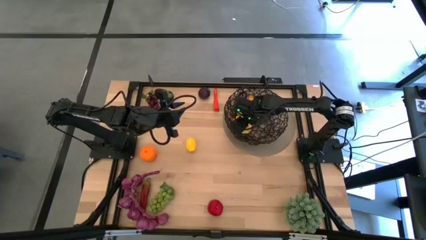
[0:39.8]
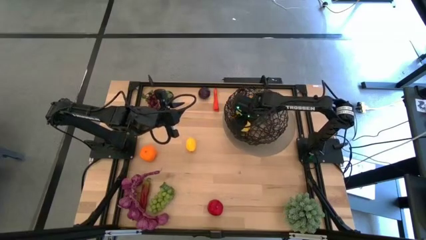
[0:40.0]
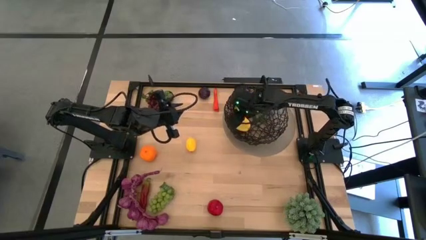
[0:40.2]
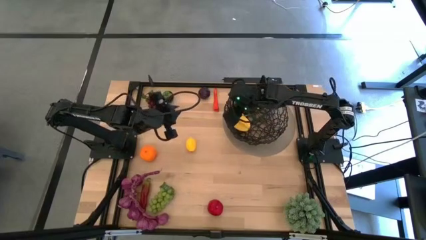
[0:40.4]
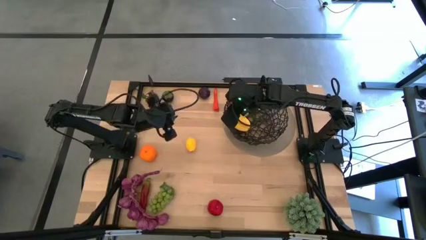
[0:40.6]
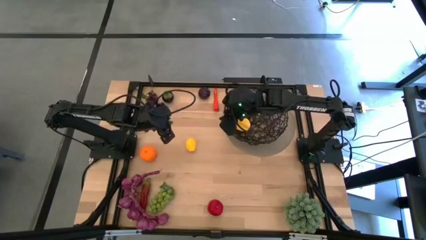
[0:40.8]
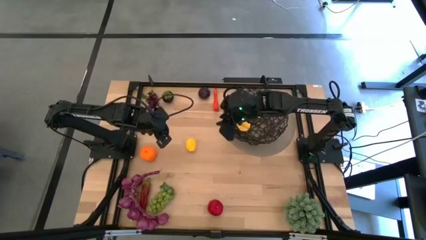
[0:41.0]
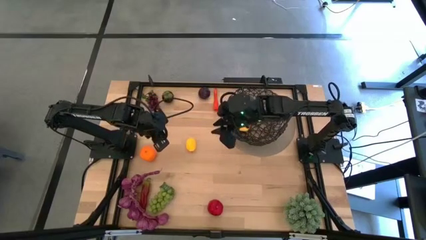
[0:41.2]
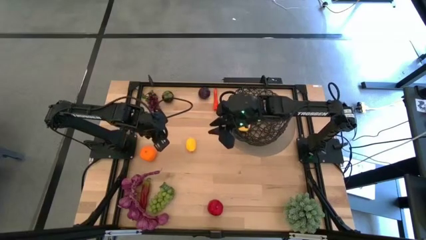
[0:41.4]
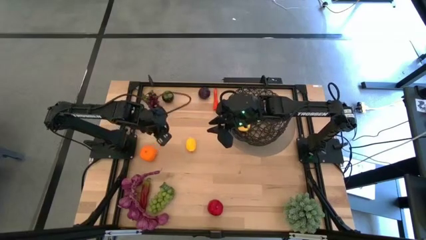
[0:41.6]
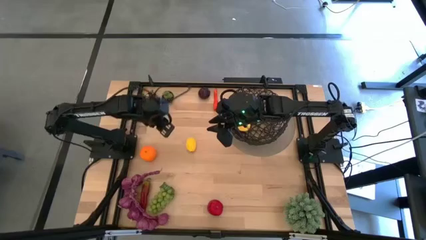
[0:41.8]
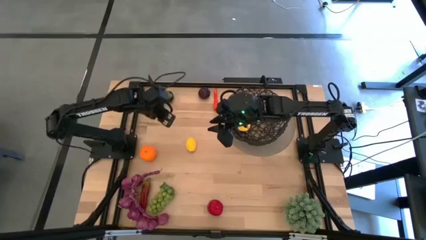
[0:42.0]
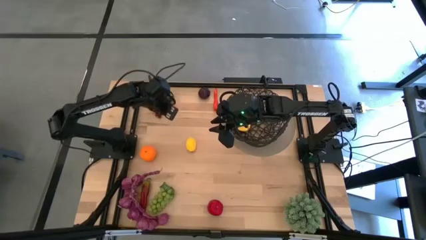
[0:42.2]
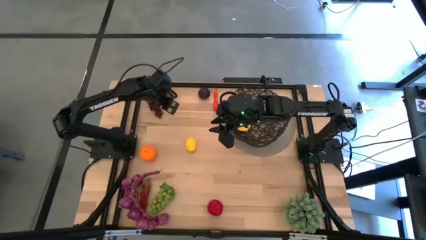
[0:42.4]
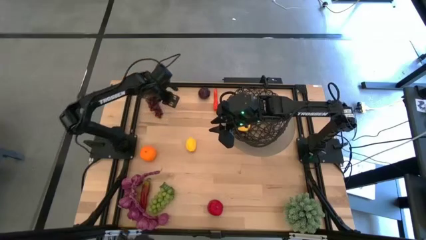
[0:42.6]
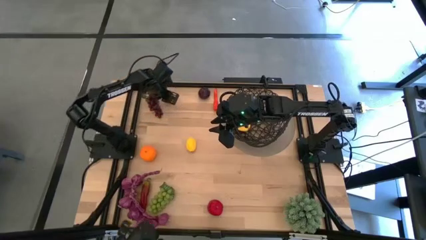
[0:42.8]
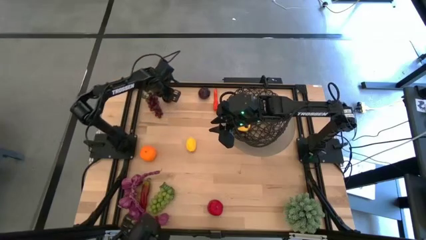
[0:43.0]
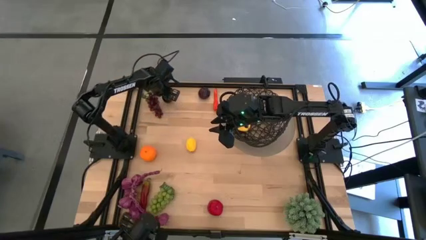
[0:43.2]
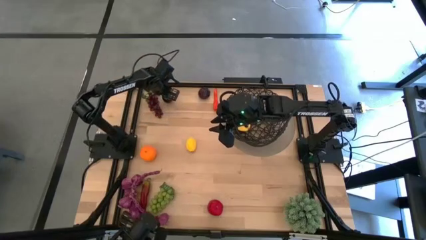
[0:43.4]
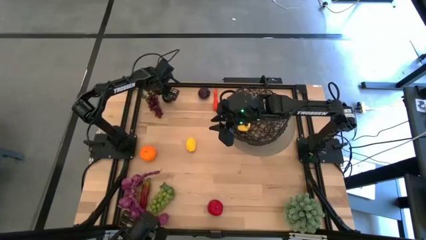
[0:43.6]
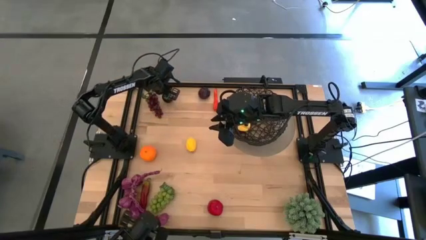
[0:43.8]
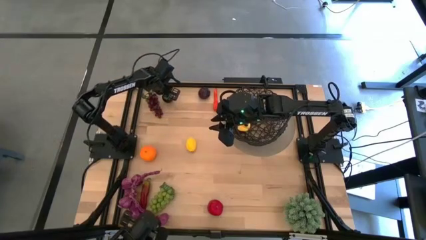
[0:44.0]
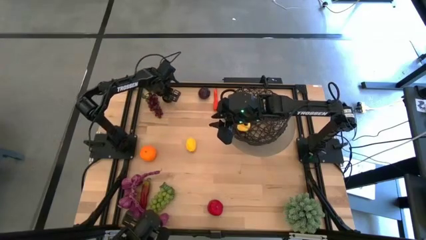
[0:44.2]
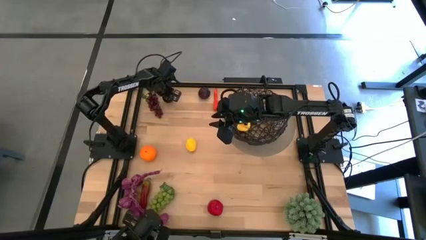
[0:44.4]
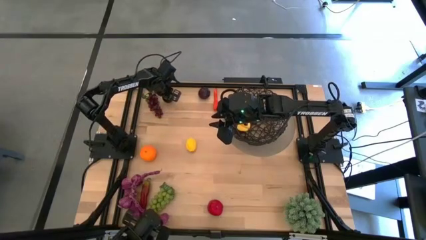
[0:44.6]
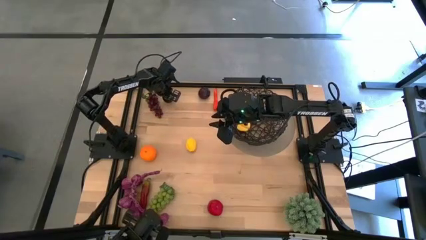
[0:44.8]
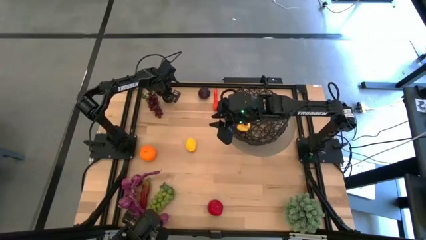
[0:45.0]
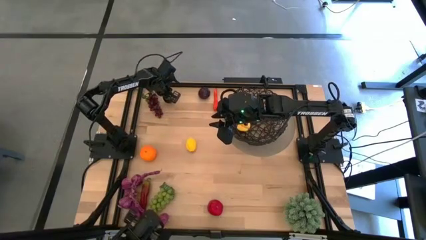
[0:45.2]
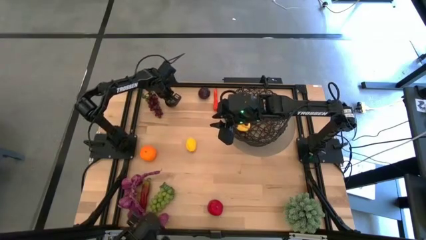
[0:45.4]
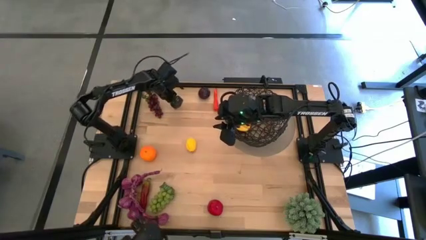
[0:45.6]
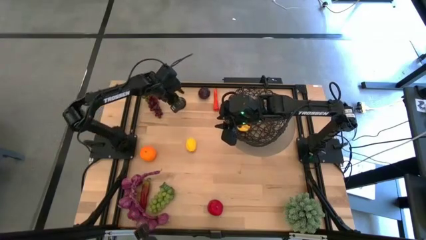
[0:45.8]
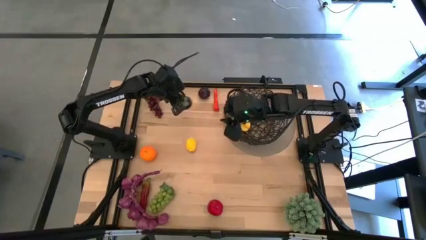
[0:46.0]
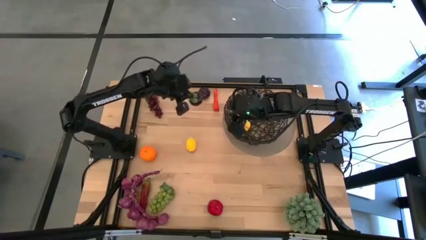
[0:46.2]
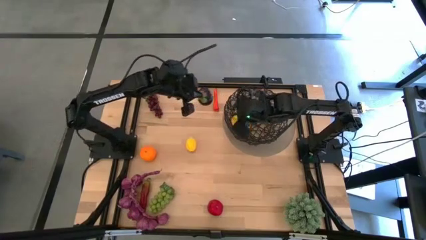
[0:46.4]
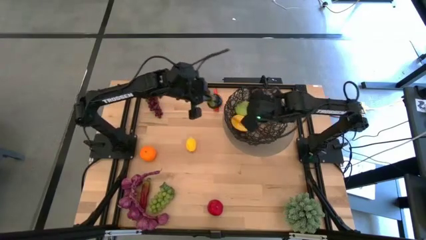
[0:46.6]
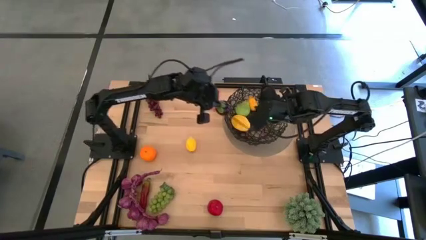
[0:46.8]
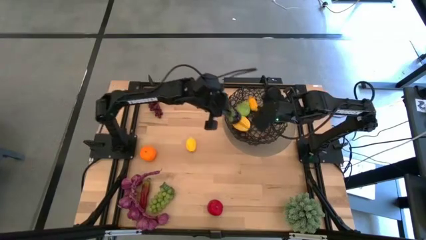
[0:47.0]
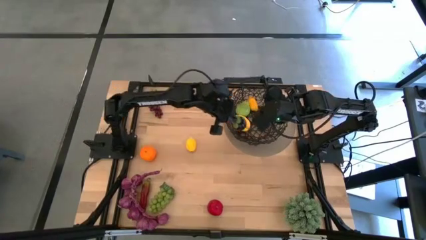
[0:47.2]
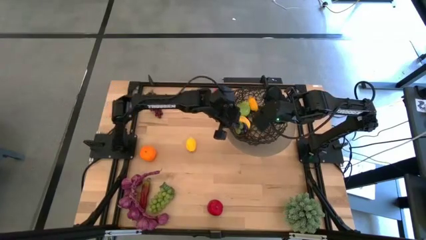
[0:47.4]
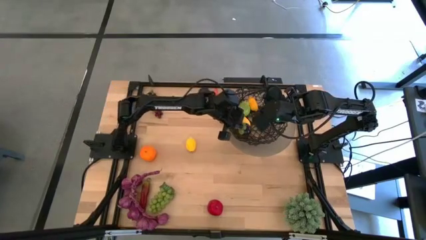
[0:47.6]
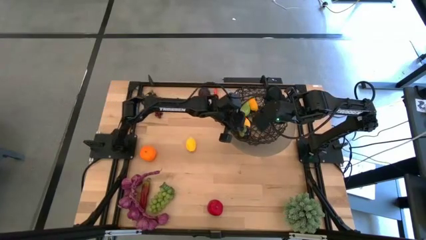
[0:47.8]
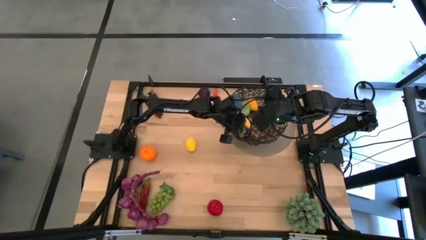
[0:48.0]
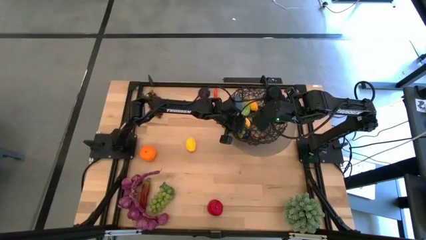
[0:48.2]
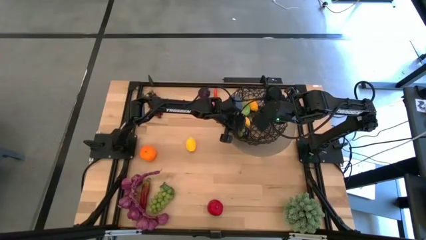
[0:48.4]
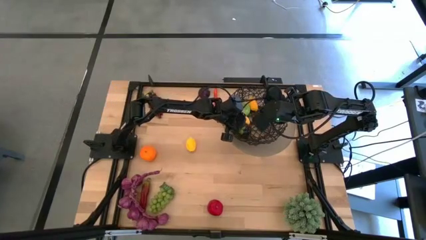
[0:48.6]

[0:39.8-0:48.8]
Task: Build produce basket
Put the mangosteen into the black wire basket

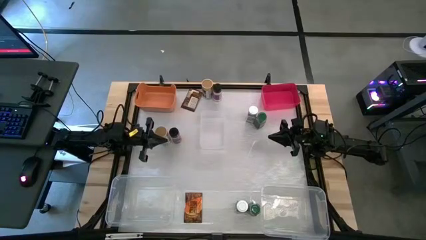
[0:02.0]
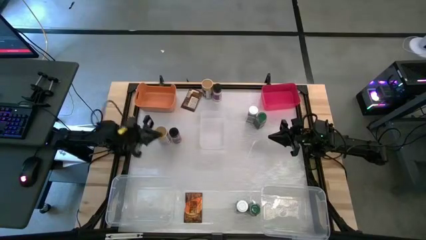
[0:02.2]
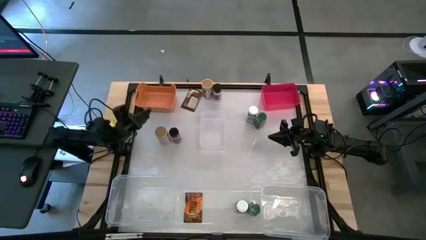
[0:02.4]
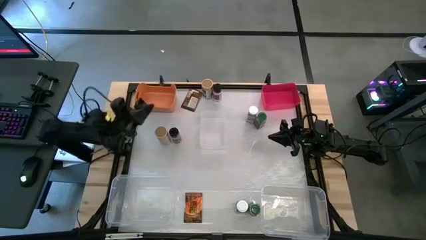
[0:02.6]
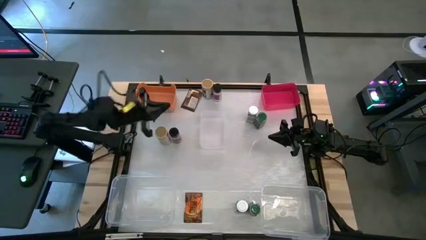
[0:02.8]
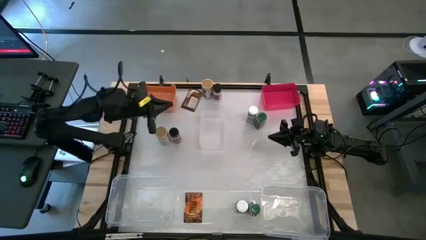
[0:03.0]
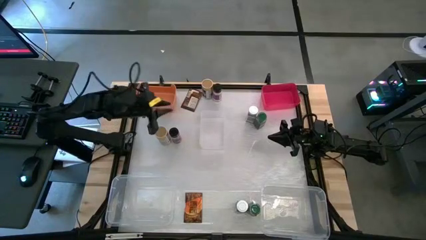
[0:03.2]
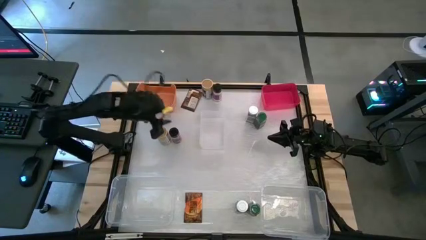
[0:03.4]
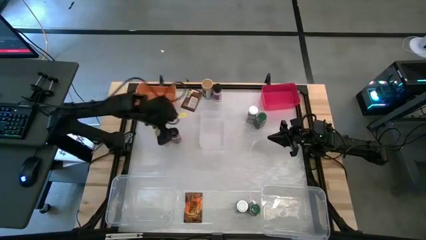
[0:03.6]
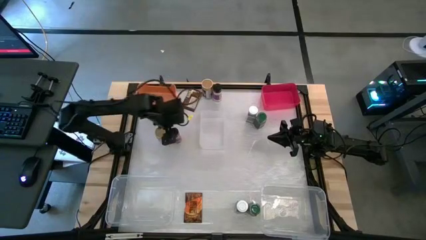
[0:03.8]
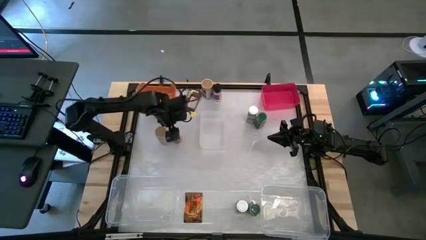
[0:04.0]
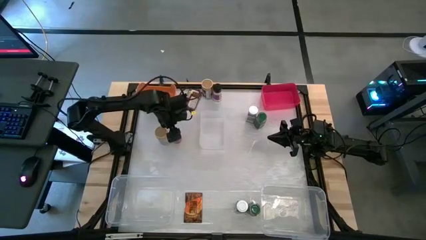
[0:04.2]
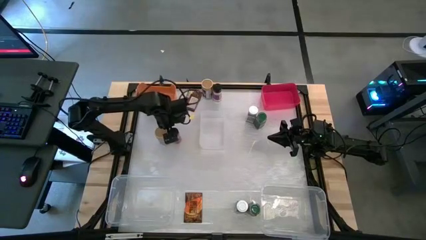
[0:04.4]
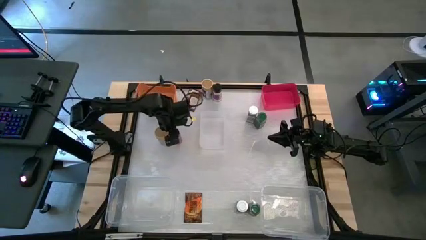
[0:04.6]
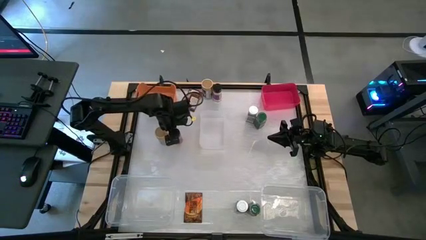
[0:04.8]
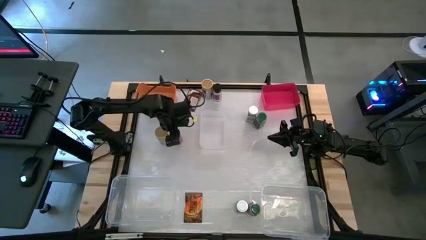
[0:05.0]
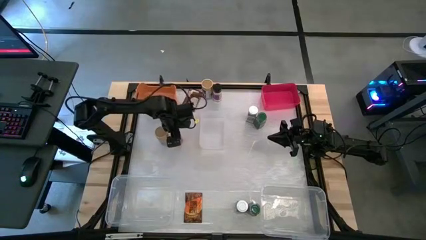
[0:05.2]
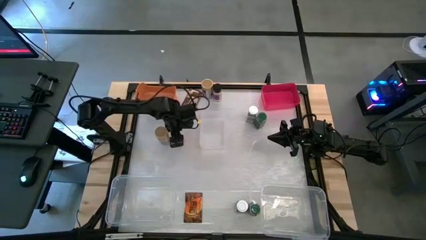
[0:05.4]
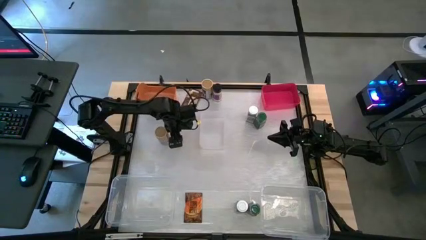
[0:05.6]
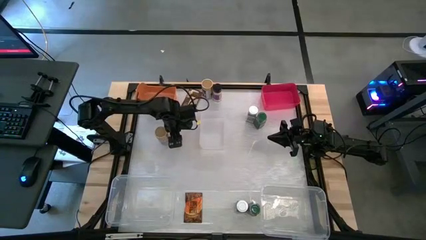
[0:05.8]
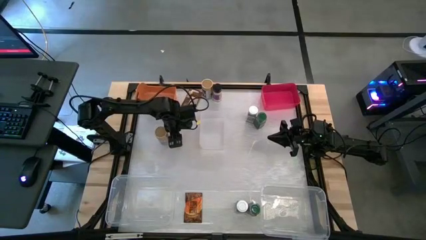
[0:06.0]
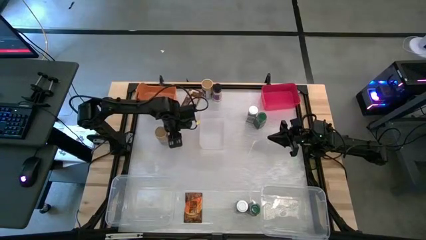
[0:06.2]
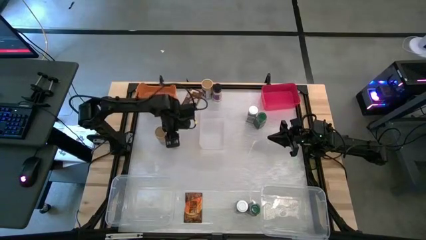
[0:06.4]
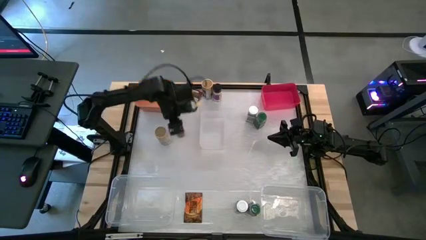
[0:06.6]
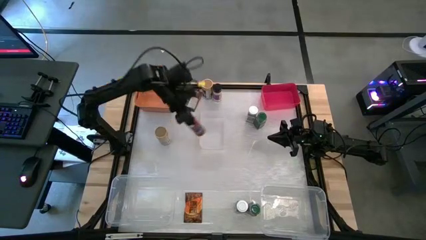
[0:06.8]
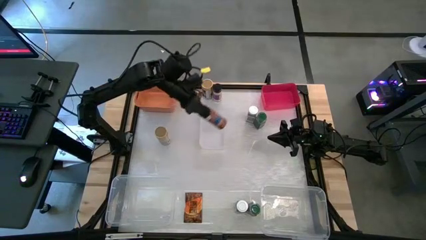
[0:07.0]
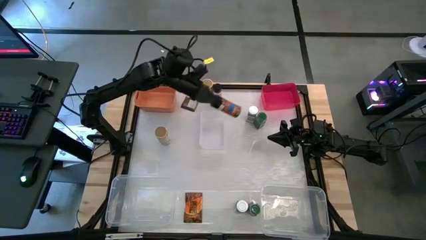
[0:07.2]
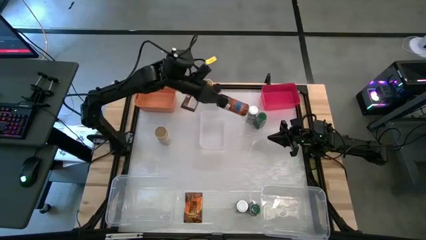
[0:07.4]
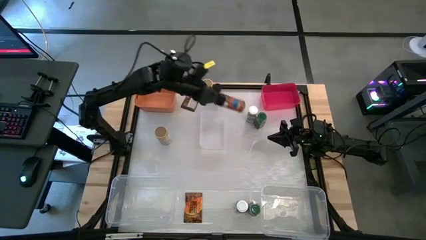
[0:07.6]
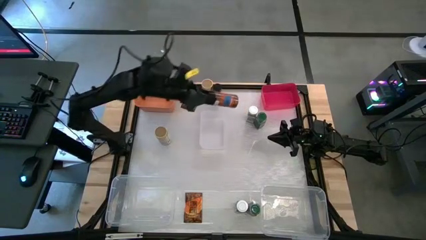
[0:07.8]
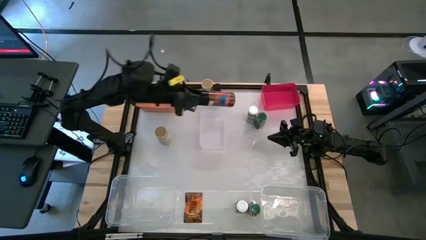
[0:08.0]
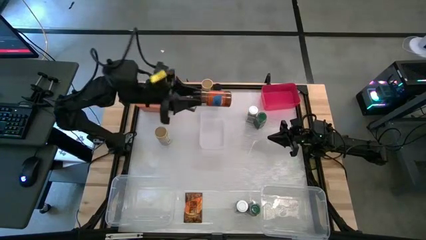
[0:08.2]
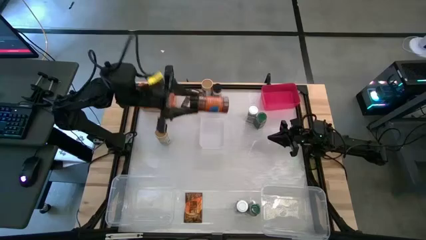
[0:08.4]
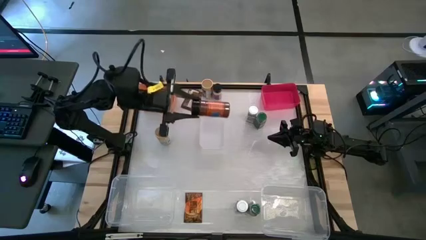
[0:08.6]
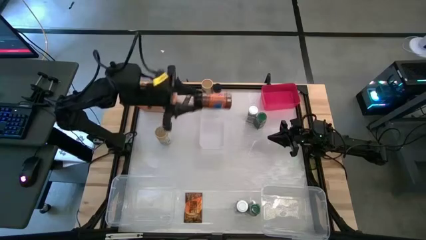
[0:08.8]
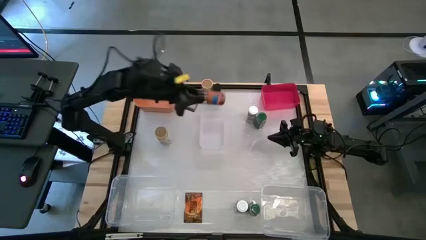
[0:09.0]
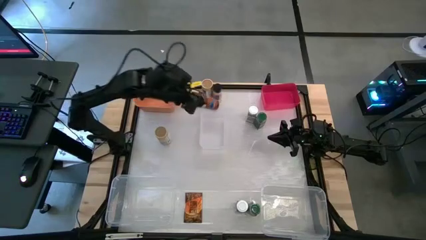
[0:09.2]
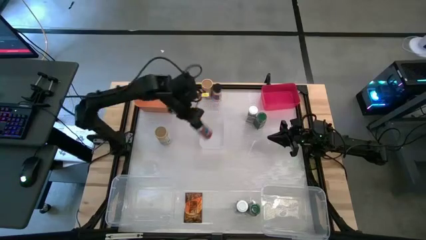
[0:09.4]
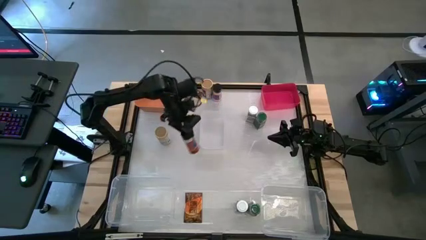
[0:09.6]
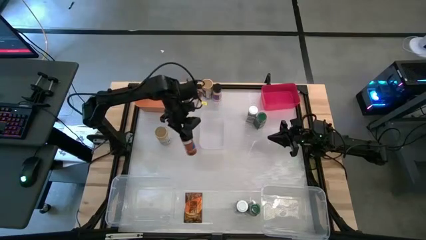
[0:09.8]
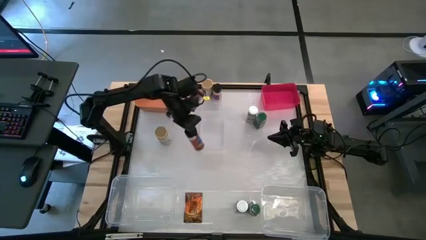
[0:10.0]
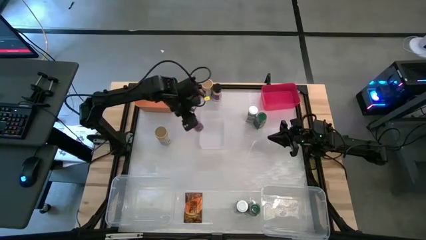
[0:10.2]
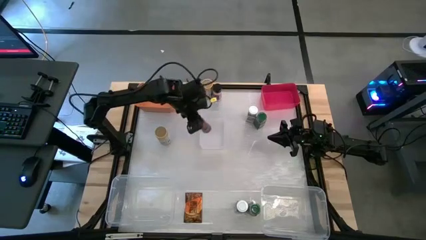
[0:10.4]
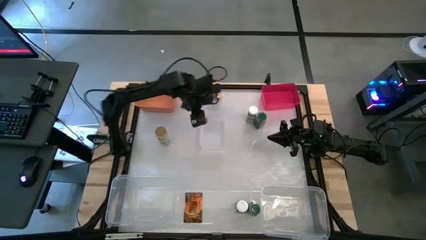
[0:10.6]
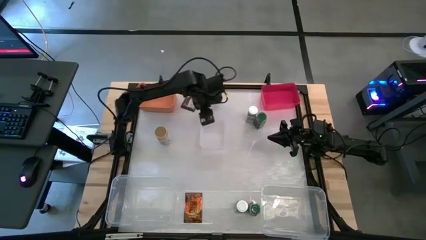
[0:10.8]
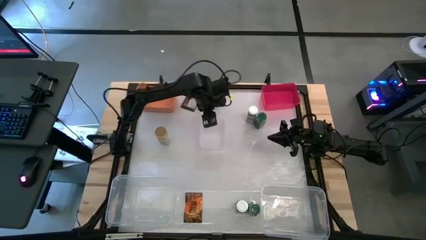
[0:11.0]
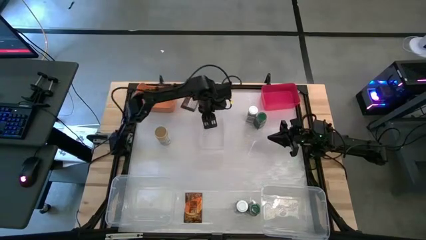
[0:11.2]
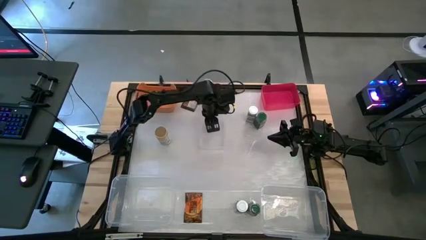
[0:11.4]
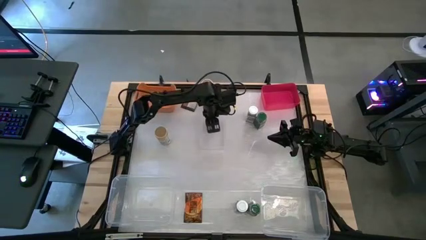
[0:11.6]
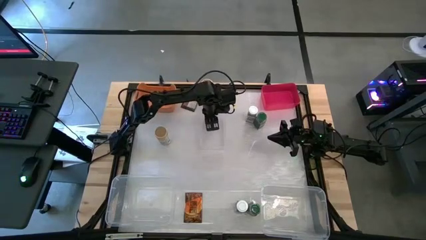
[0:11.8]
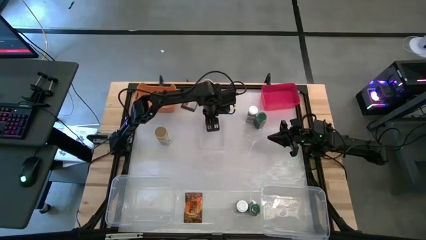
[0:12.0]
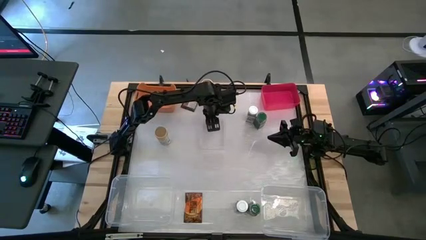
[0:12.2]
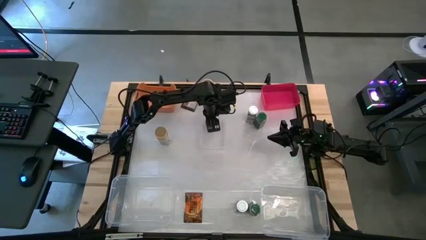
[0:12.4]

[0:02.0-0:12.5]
Task: Sort spices by type
Put the bottom black seasoning bottle into the white bin
